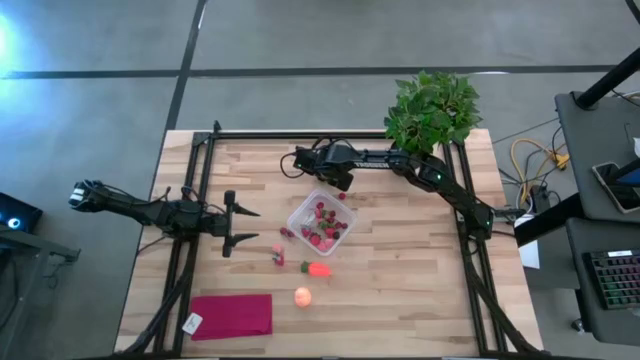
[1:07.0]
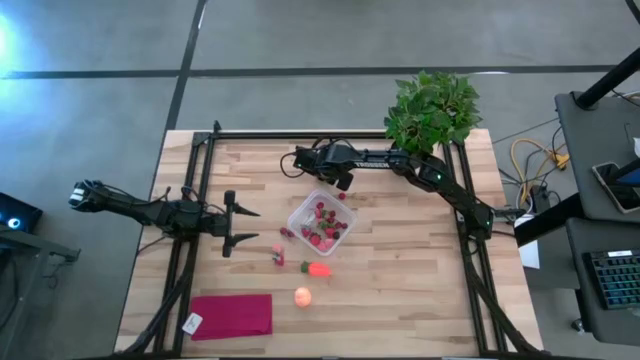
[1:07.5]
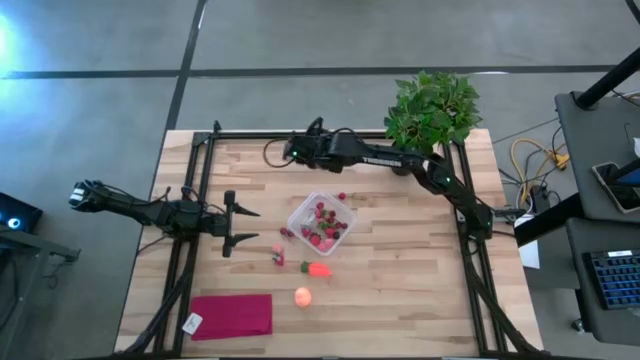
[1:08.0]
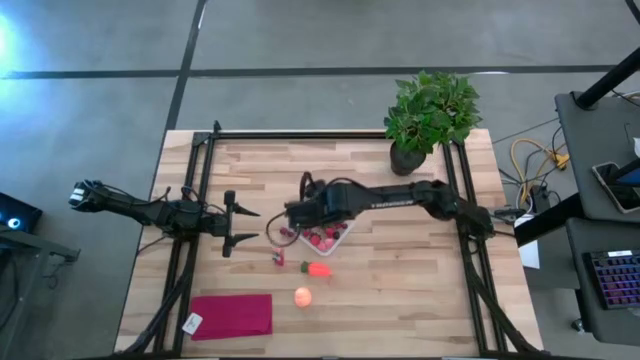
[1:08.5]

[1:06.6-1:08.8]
Task: Pick and placing Produce into tupperware
Put the red strawberry into the transparent container

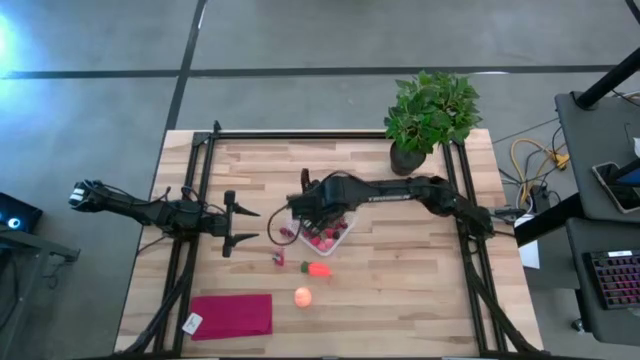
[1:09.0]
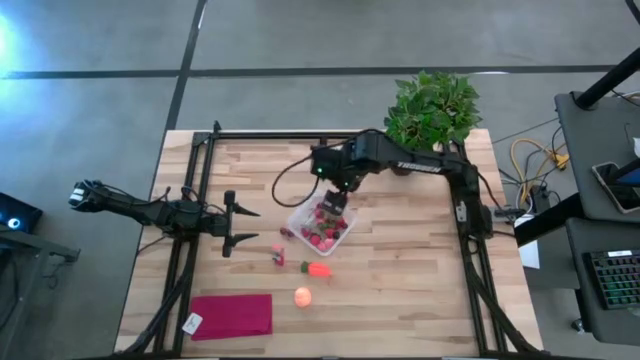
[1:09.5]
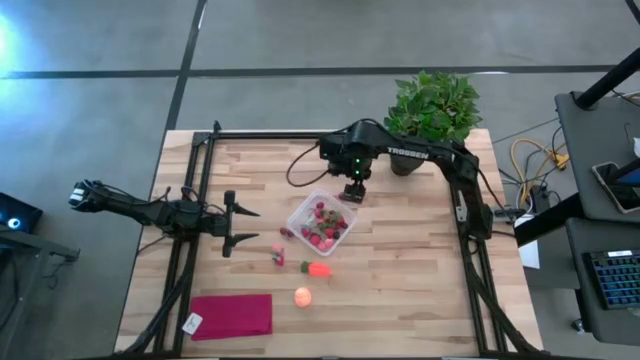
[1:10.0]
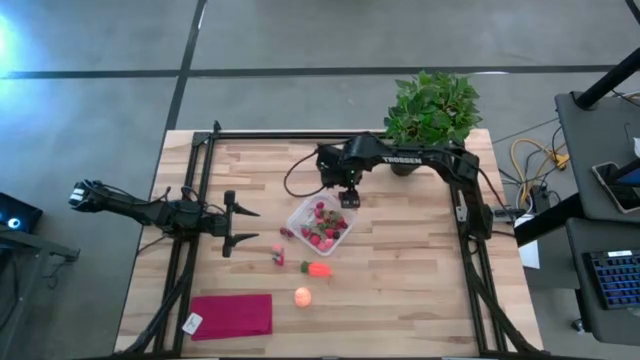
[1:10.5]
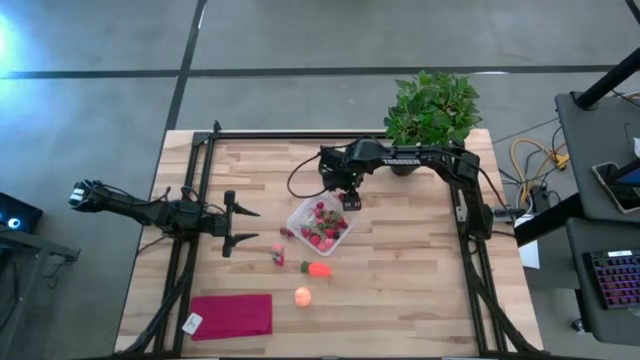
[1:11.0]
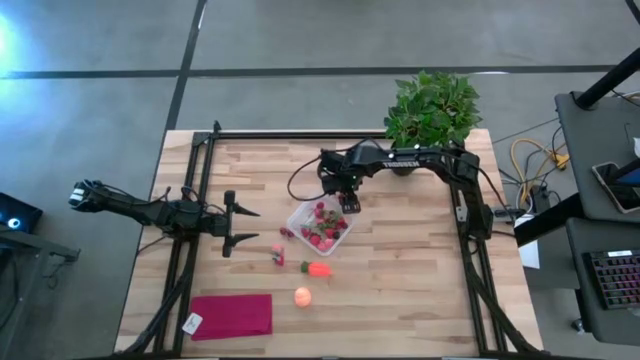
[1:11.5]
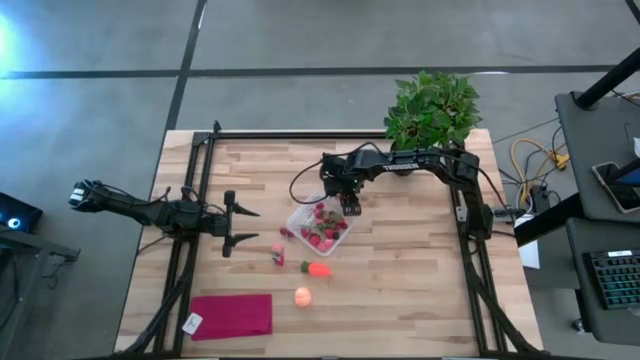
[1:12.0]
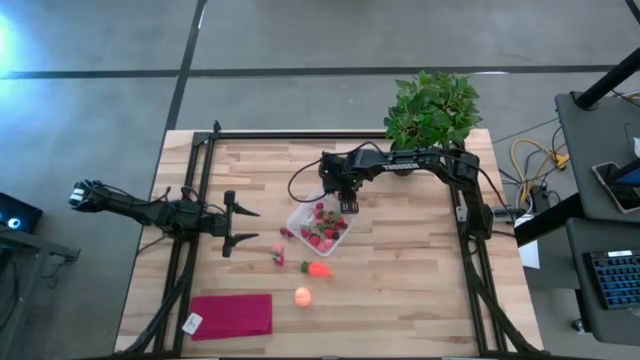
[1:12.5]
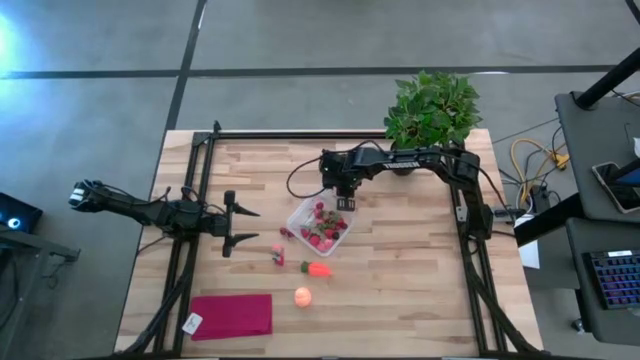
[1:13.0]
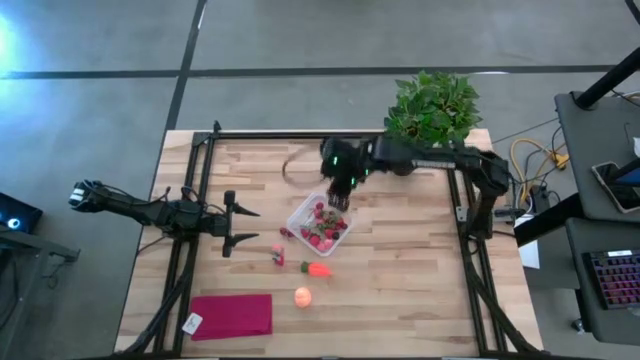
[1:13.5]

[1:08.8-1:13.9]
Put the red cherry into the transparent container

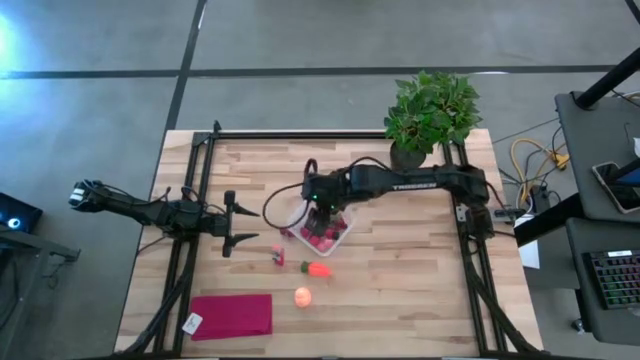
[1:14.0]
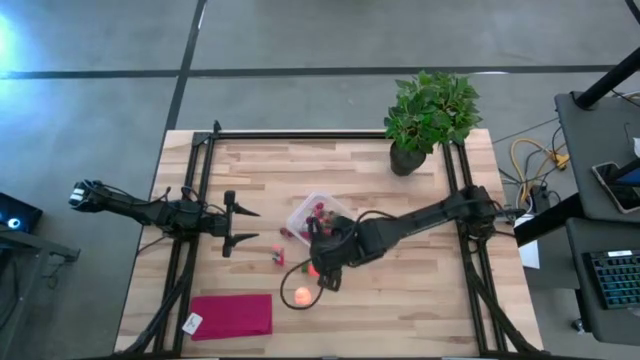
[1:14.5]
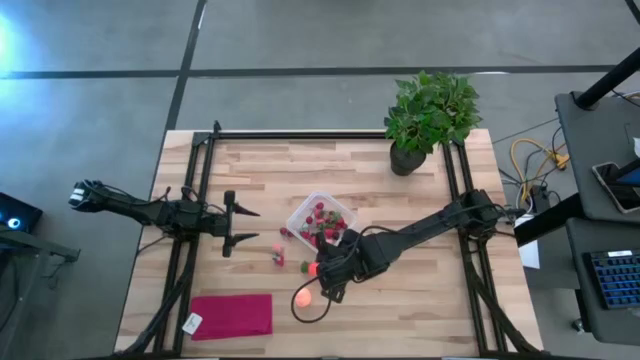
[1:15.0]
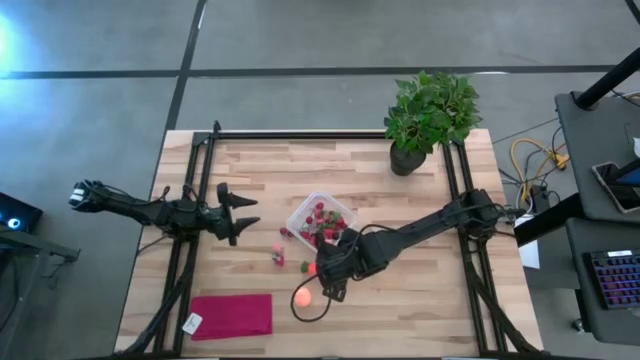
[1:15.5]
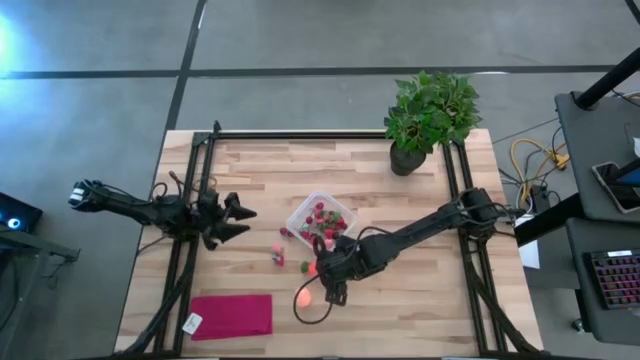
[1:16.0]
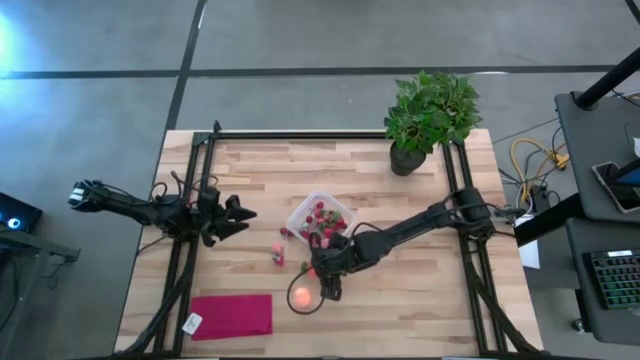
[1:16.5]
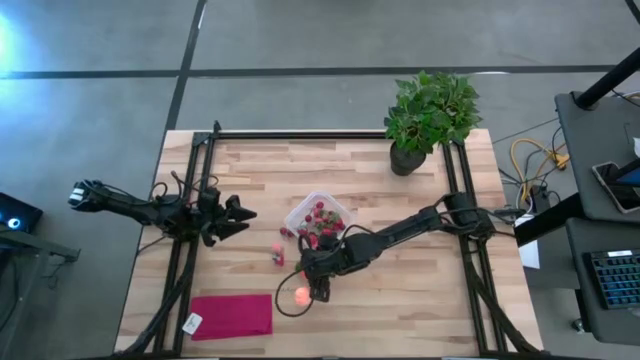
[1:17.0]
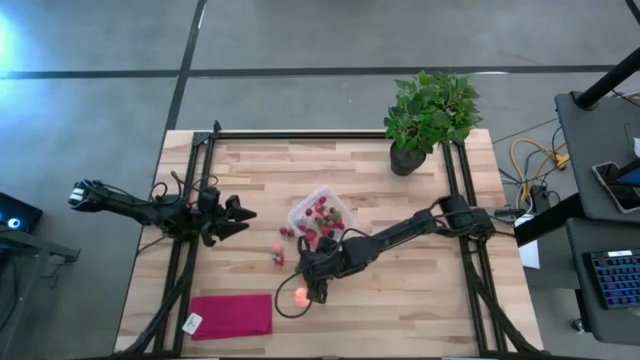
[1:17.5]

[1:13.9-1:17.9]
Put the orange carrot into the transparent container

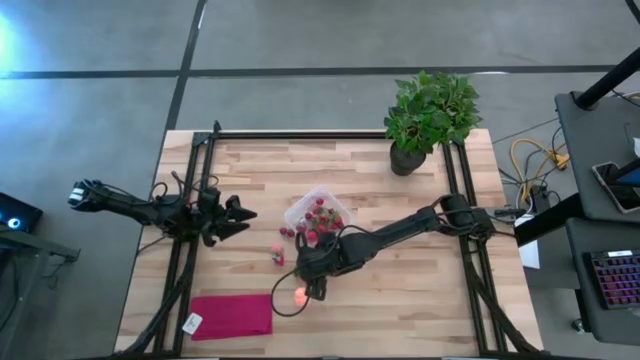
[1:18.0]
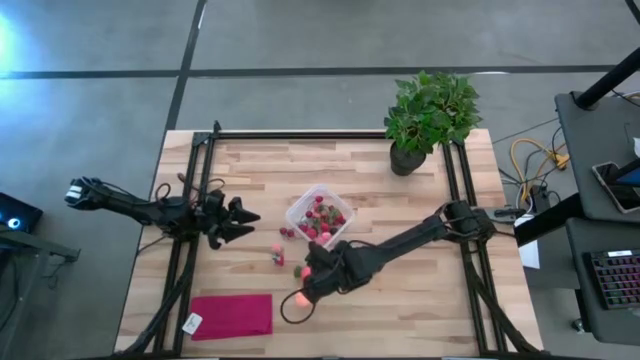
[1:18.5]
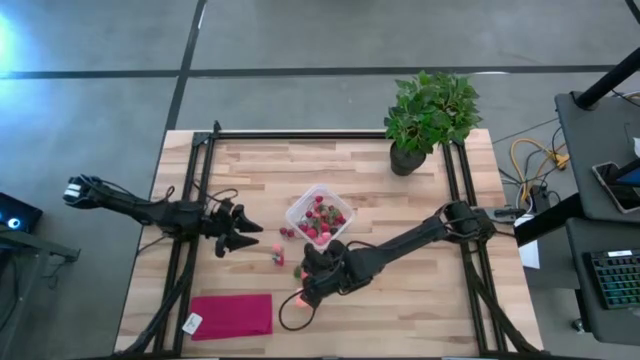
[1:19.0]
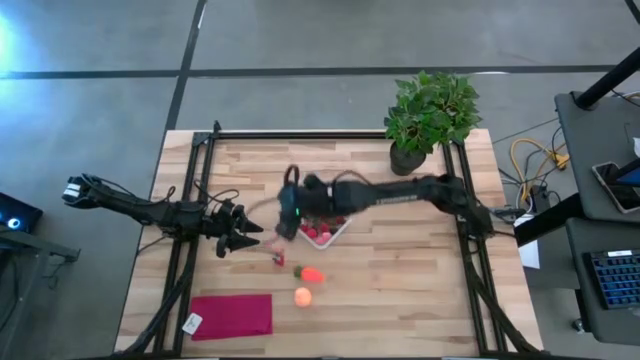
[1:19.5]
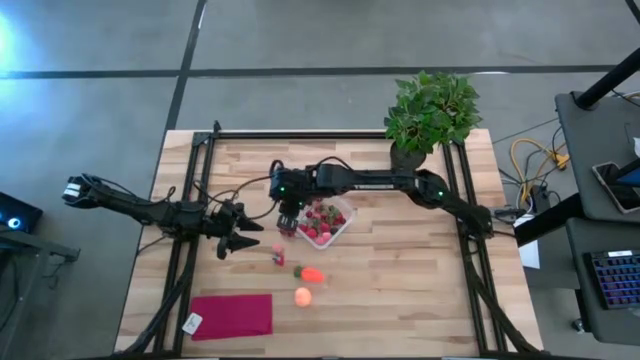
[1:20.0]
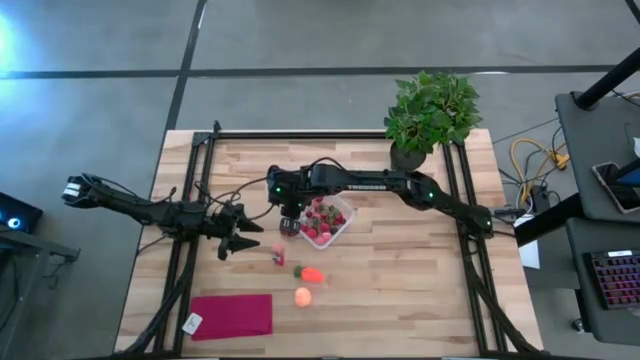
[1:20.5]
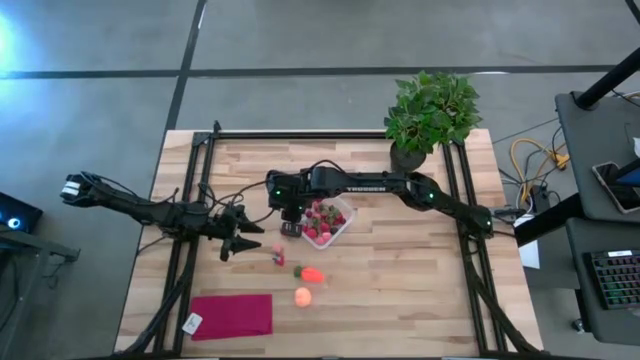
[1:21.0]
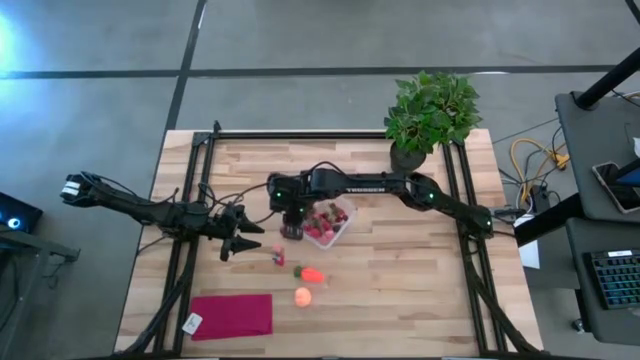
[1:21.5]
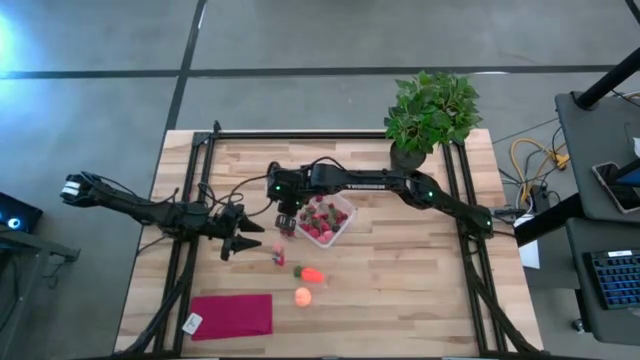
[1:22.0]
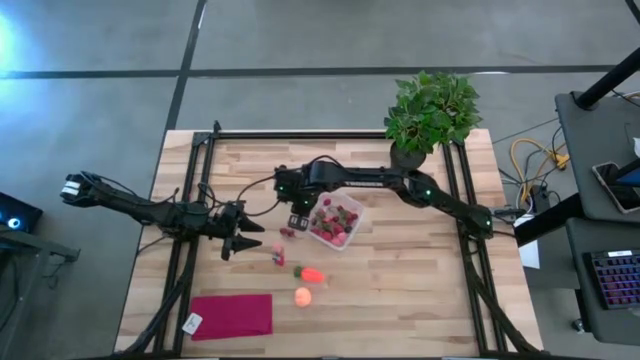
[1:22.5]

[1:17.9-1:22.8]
Adjust the transparent container on the table

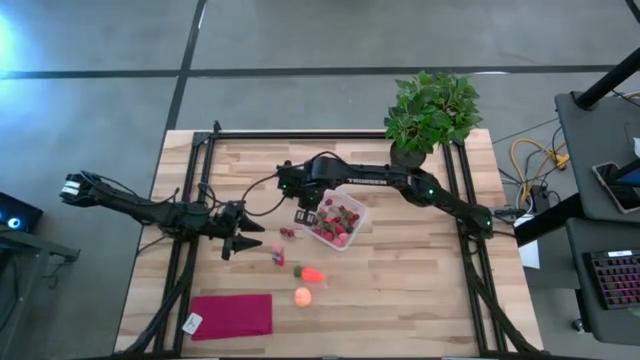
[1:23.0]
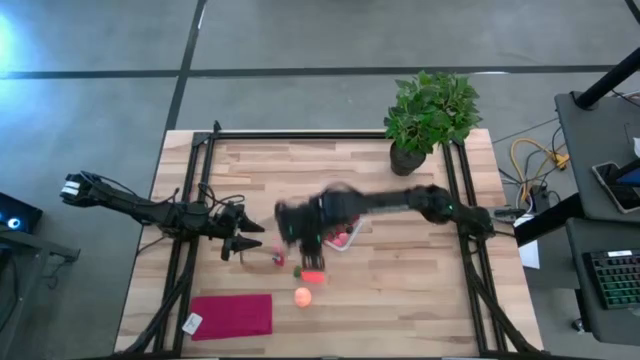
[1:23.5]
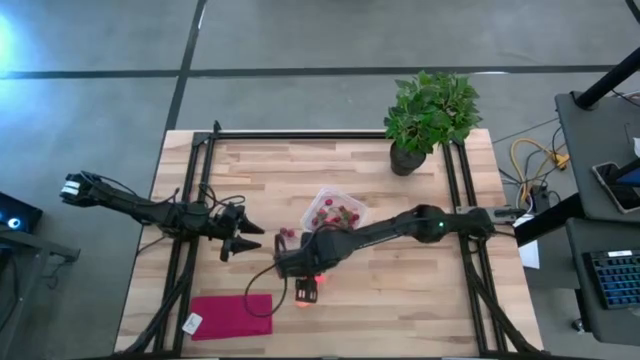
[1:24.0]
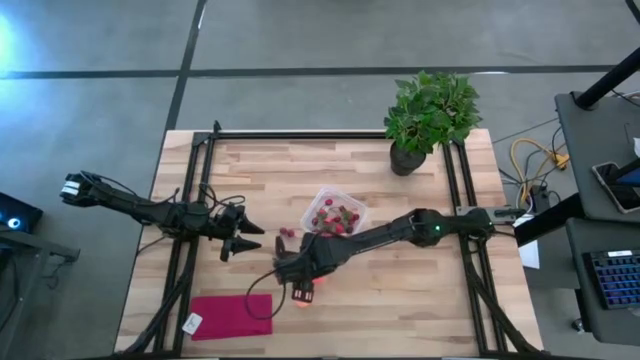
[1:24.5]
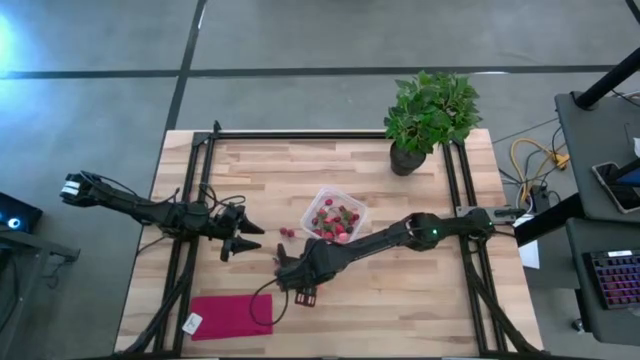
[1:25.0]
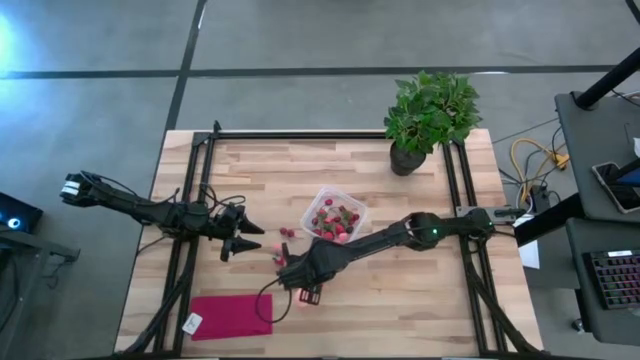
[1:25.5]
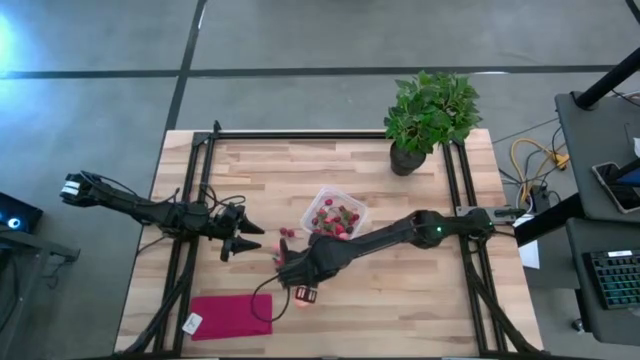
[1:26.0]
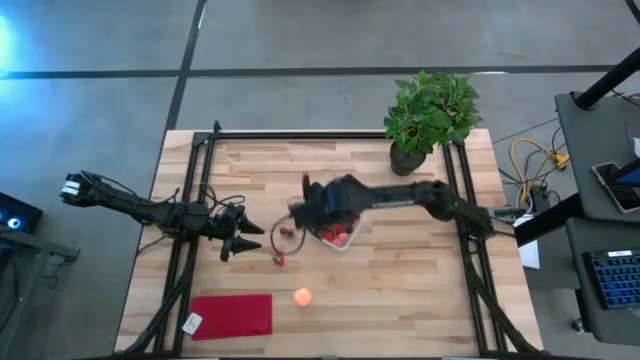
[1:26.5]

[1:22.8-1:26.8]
Put the orange carrot into the transparent container

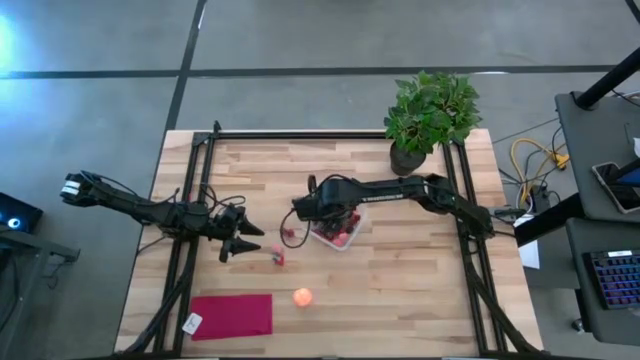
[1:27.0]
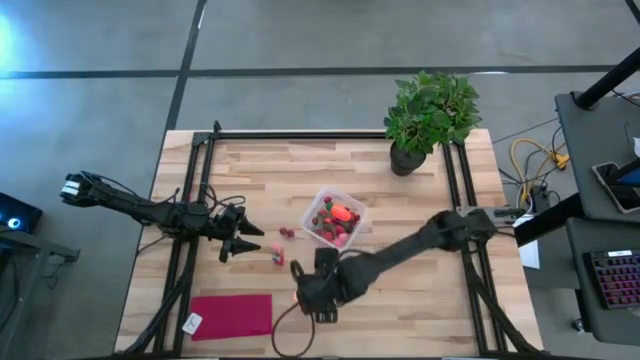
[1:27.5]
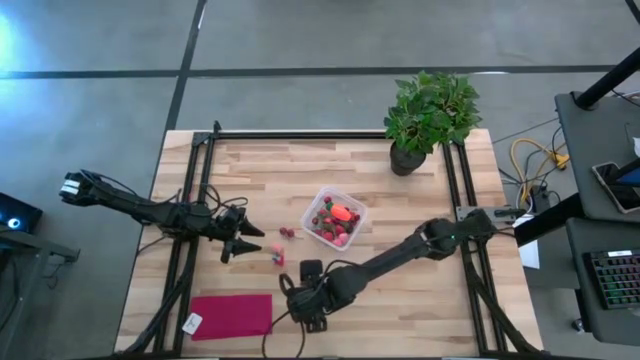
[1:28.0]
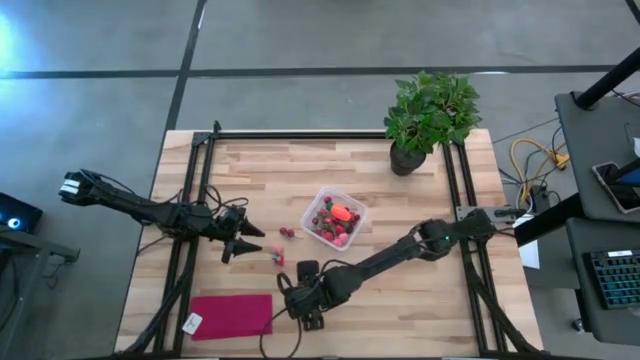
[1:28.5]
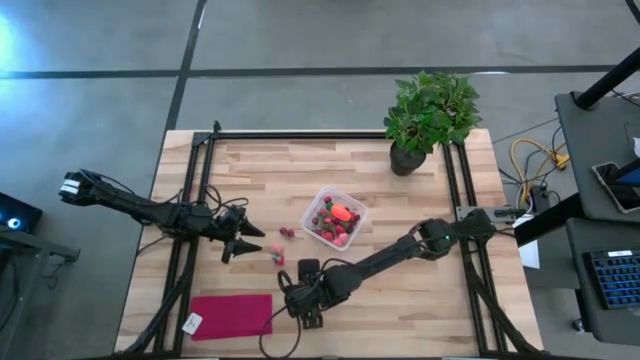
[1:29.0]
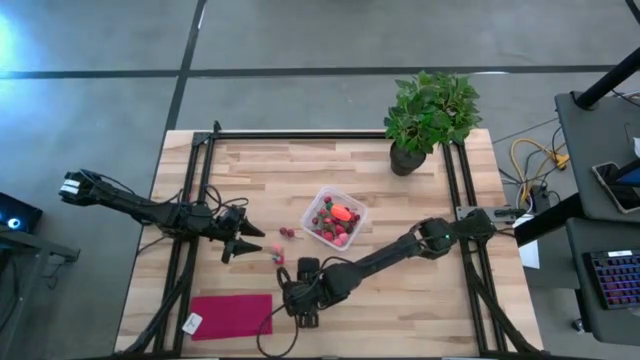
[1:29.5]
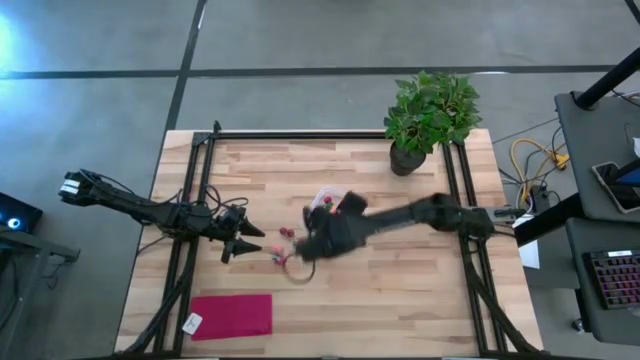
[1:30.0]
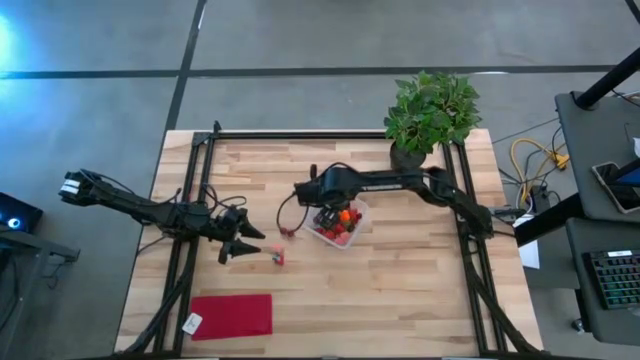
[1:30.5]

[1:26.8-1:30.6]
Put the light orange peach into the transparent container
